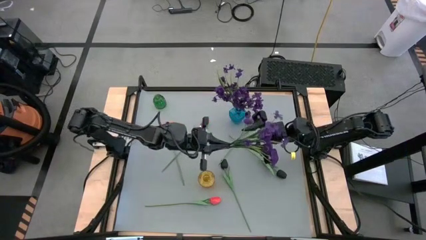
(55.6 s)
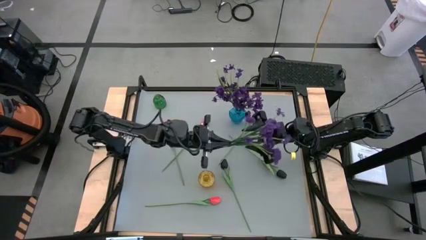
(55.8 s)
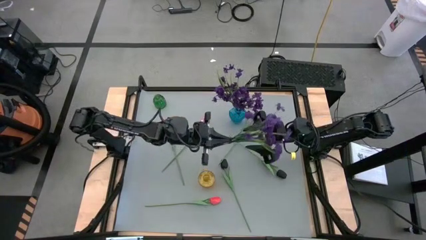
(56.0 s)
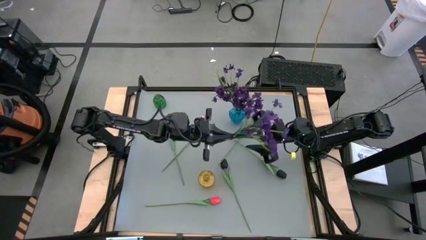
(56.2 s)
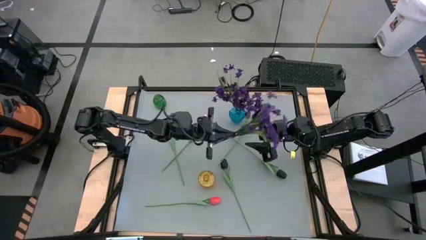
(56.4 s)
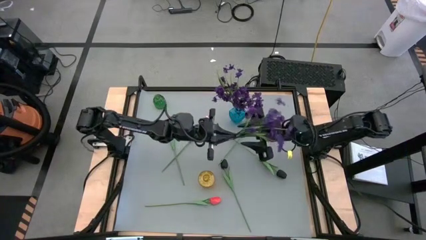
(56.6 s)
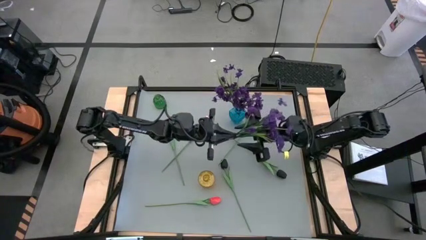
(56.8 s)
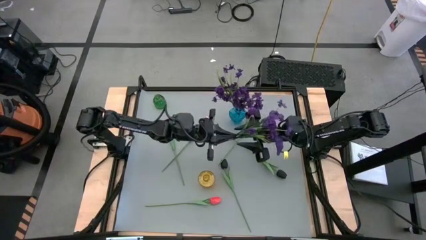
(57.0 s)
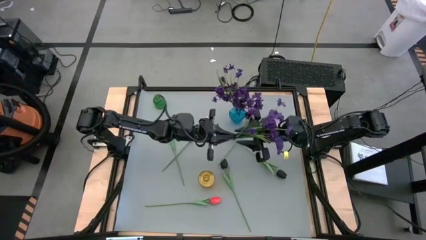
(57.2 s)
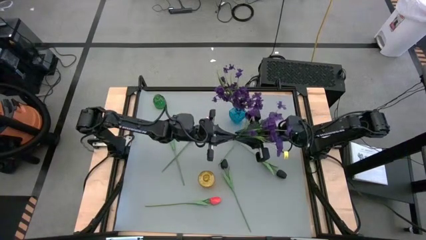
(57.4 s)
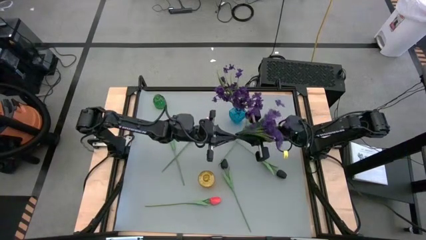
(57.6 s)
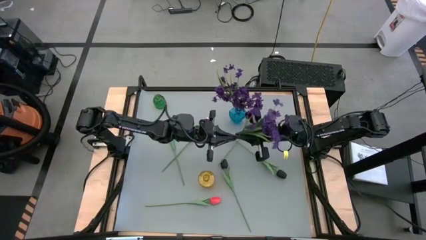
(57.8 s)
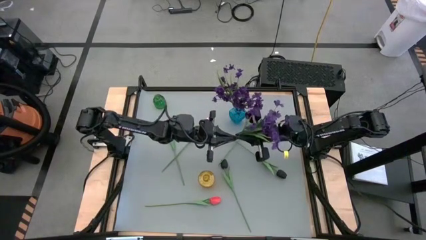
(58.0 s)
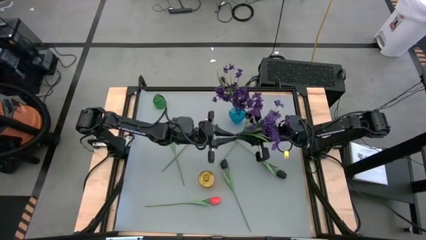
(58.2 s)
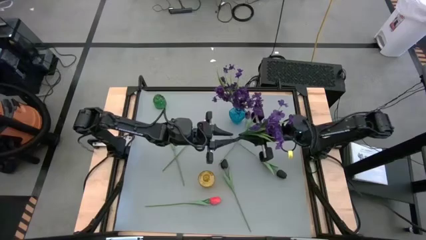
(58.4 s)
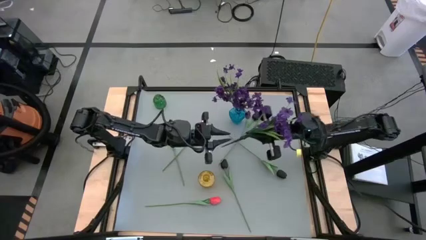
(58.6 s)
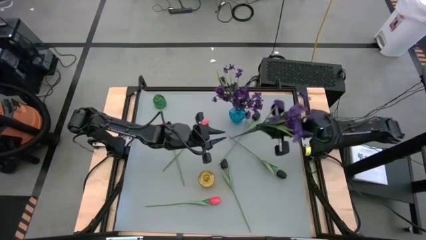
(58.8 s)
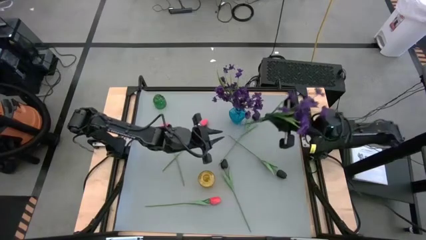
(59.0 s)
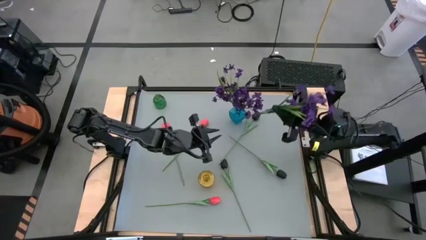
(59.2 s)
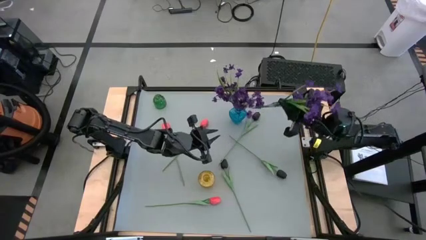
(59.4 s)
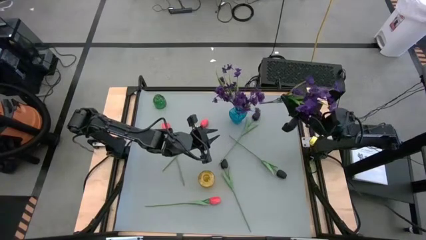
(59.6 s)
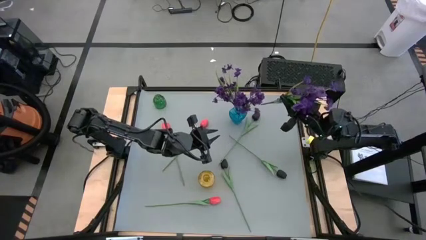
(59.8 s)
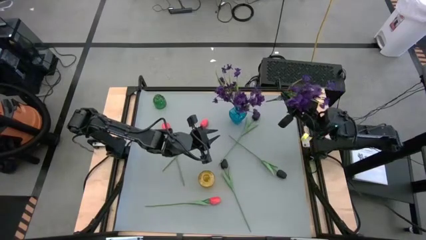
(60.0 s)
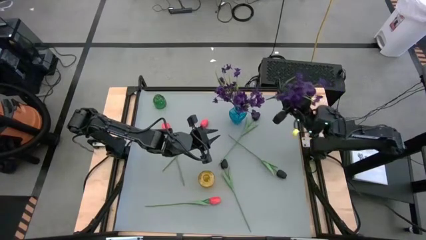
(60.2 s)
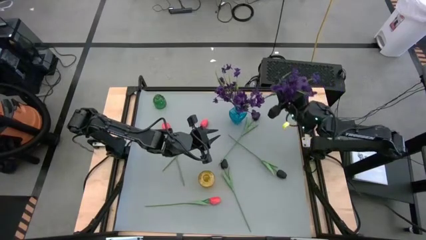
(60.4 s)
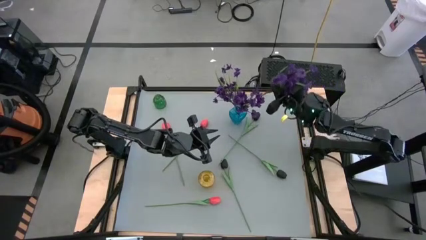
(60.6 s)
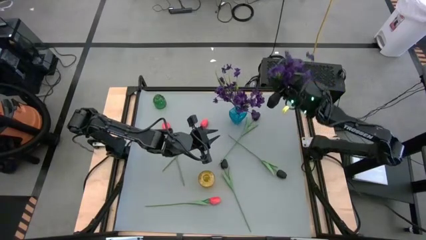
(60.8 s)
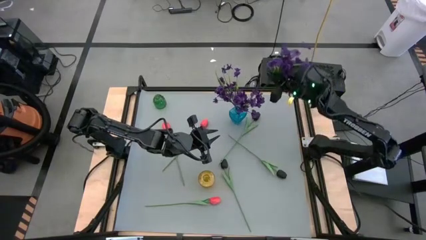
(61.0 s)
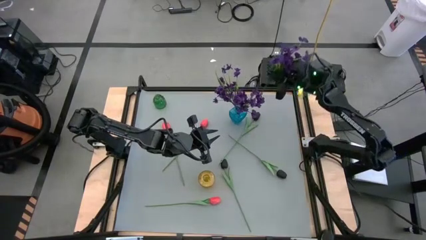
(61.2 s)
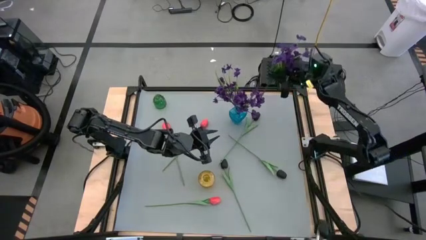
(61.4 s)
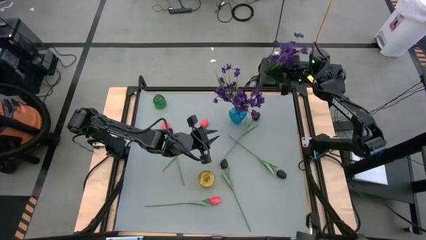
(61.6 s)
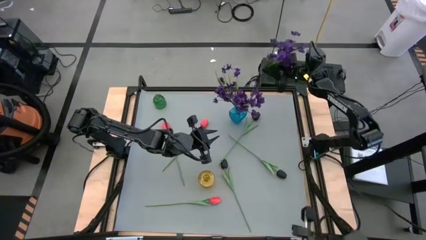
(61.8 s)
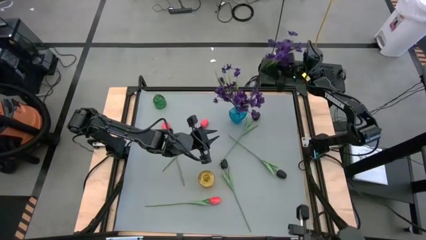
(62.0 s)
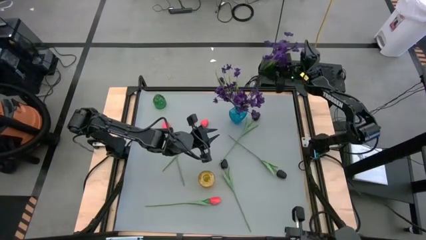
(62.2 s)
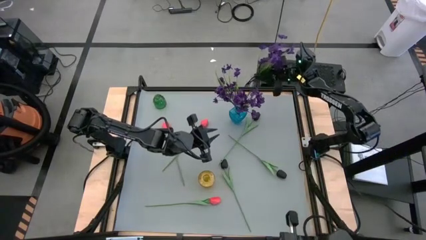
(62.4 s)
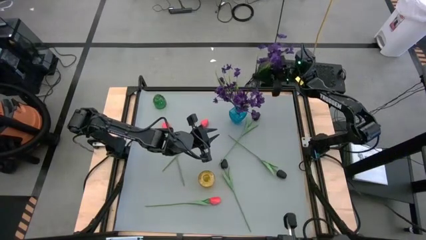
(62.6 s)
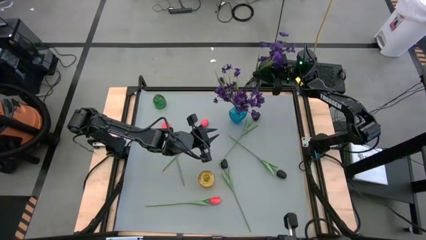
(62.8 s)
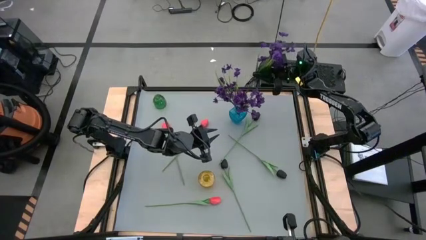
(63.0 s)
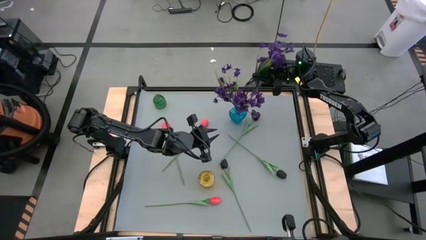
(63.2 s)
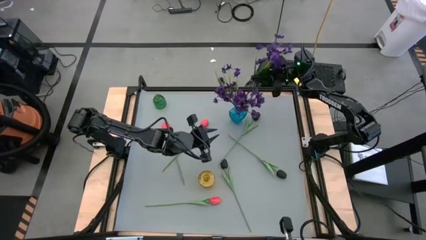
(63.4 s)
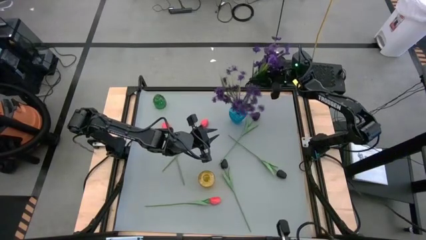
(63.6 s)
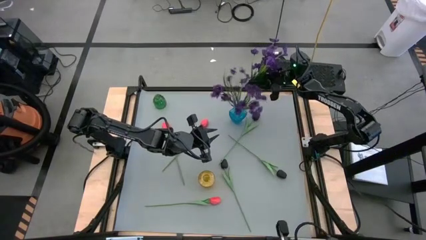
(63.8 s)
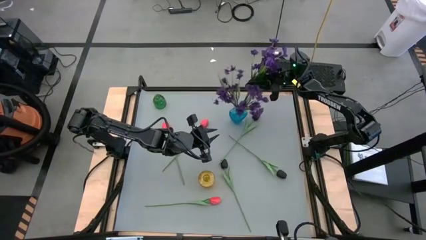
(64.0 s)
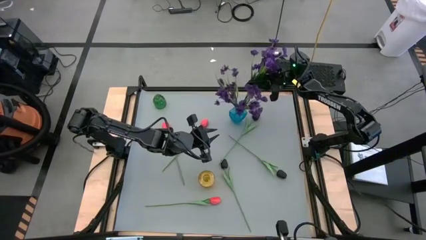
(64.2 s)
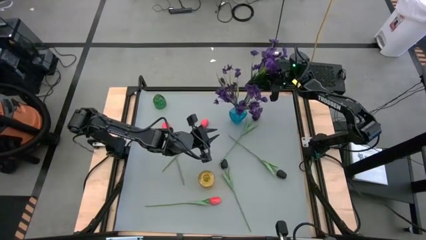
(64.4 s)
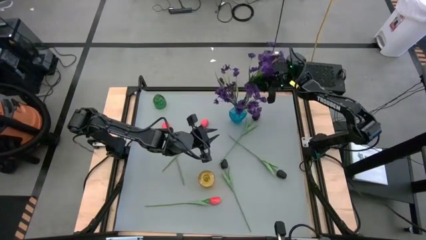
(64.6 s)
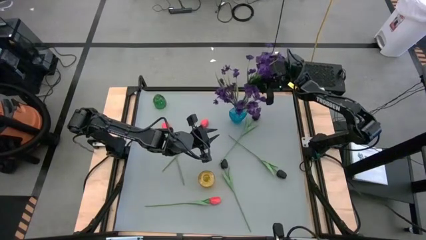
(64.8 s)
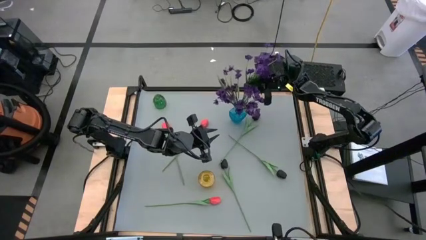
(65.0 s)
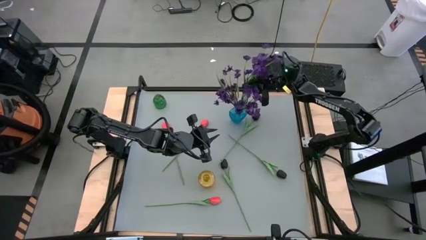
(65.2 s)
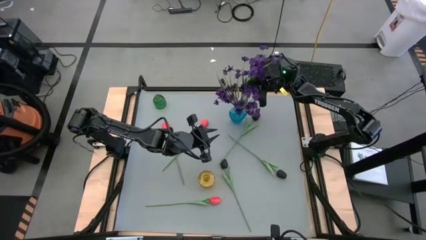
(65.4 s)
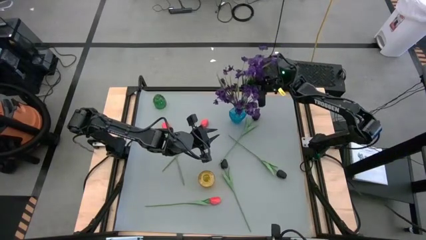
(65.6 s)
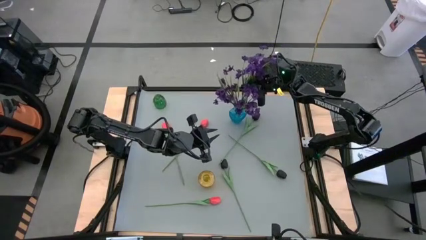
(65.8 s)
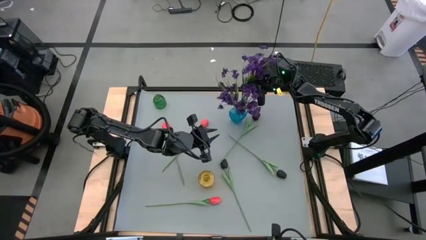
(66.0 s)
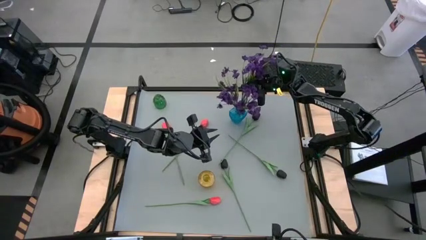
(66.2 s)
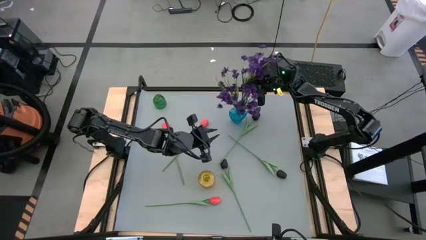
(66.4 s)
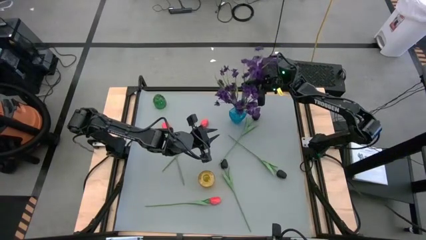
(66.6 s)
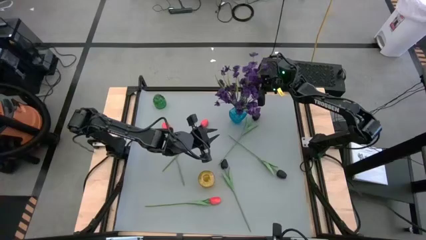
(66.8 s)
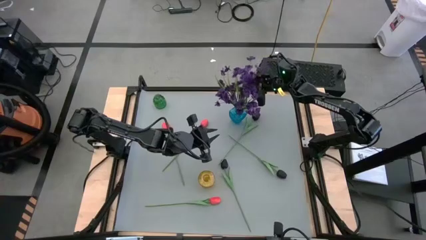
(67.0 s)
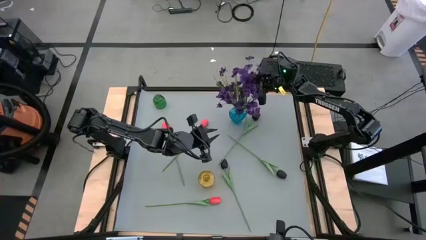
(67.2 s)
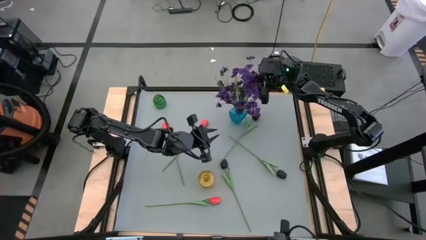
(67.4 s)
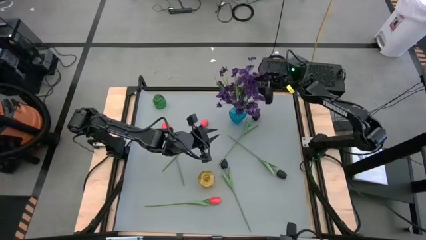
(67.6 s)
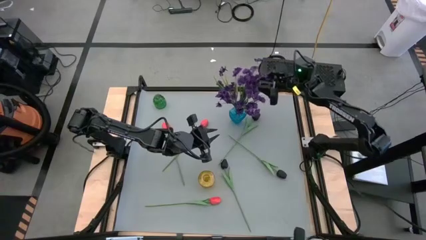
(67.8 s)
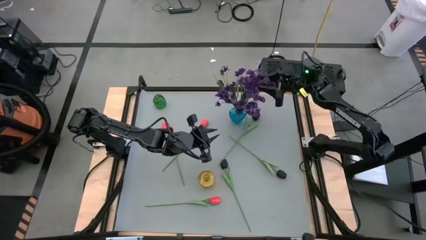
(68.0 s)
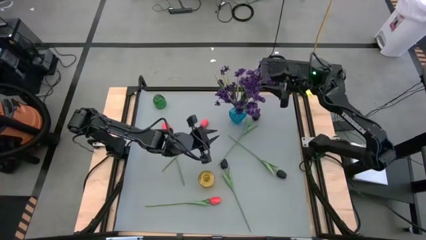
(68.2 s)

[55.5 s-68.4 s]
Task: Sort flowers into vase by color
Put the purple flowers into the blue vase

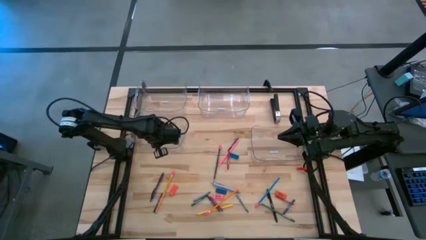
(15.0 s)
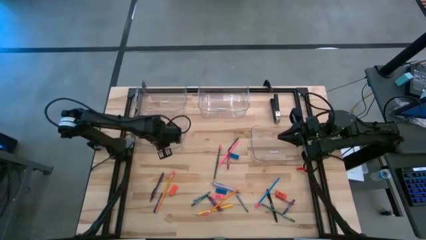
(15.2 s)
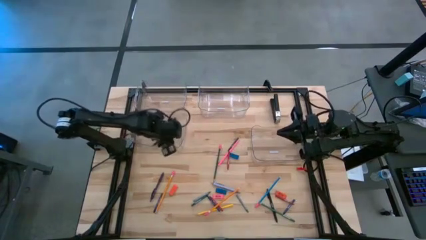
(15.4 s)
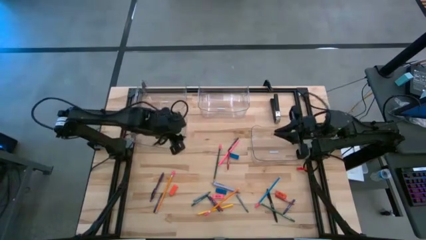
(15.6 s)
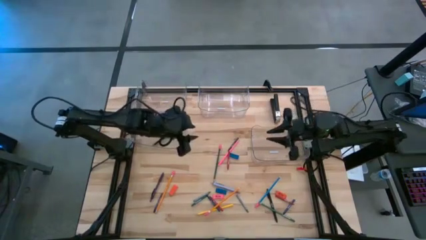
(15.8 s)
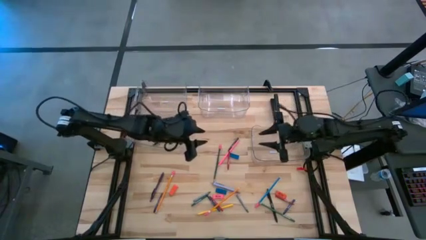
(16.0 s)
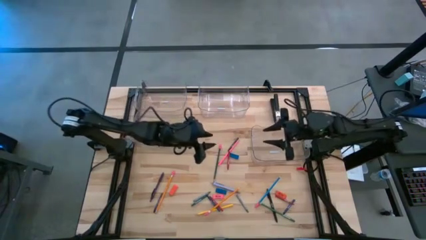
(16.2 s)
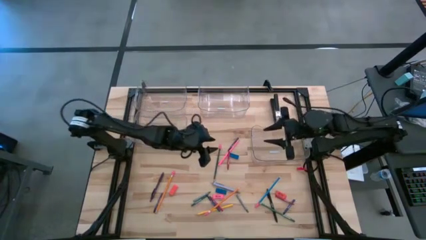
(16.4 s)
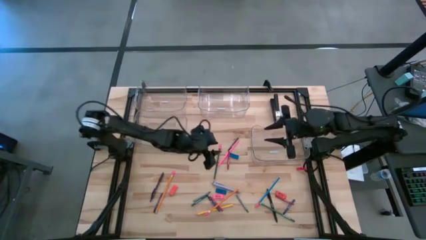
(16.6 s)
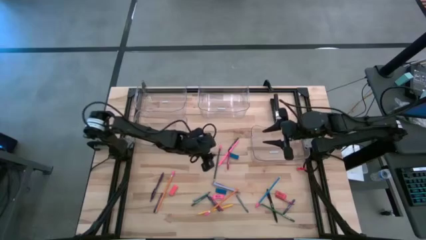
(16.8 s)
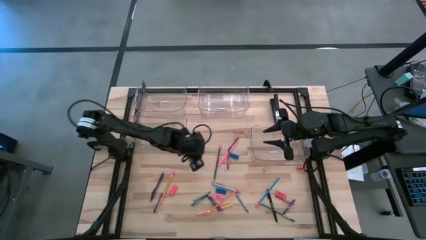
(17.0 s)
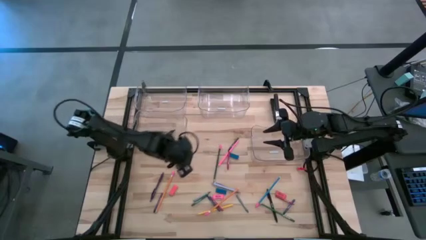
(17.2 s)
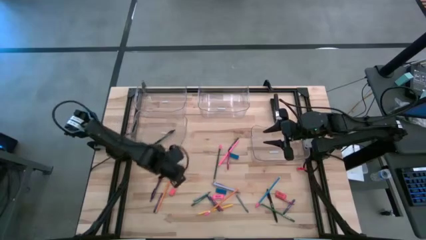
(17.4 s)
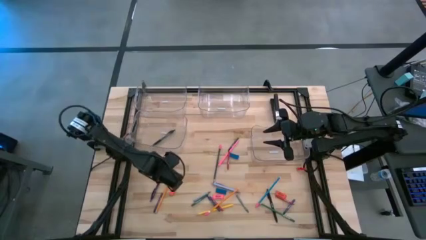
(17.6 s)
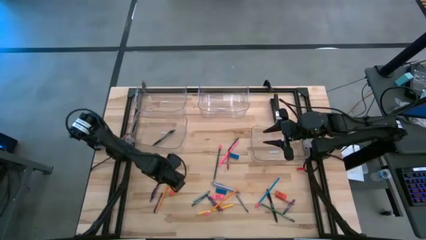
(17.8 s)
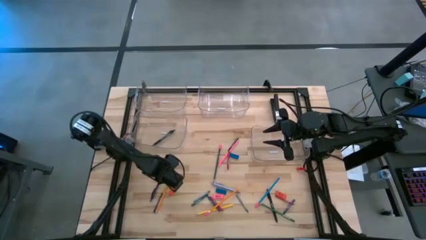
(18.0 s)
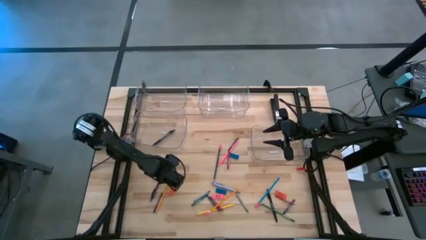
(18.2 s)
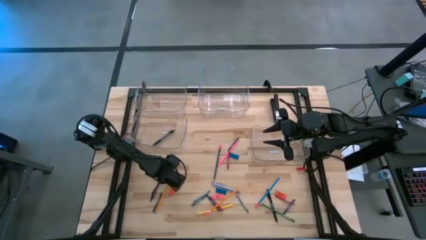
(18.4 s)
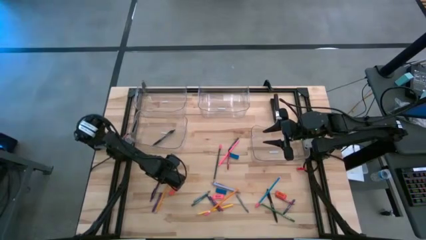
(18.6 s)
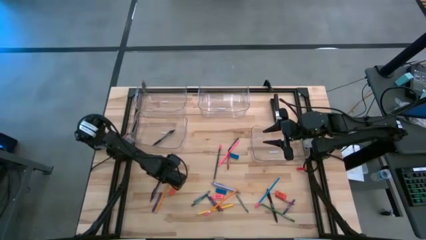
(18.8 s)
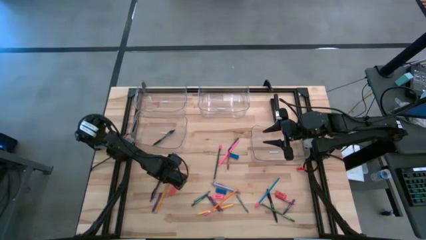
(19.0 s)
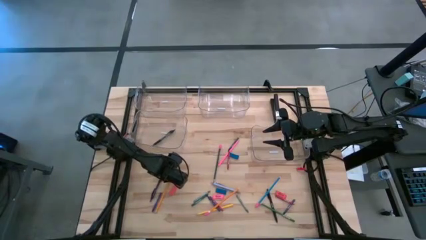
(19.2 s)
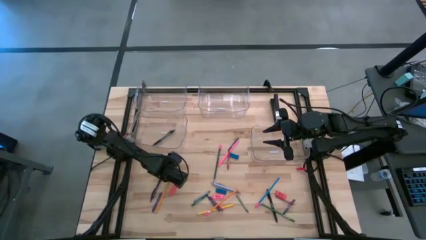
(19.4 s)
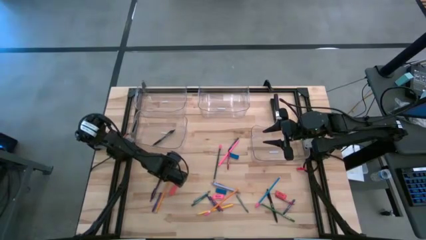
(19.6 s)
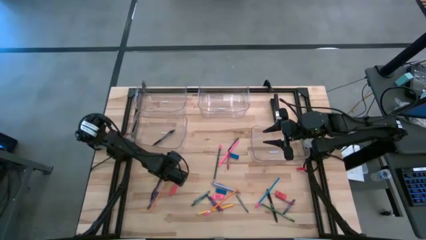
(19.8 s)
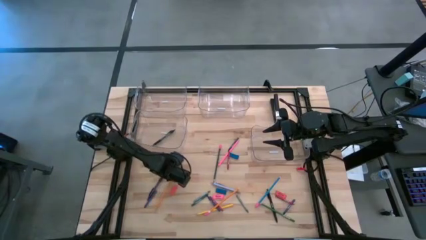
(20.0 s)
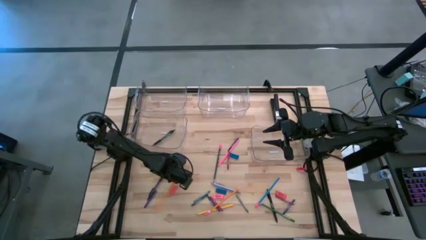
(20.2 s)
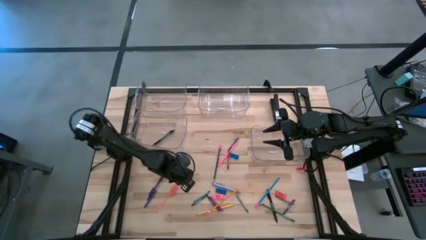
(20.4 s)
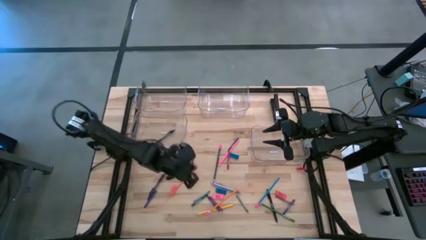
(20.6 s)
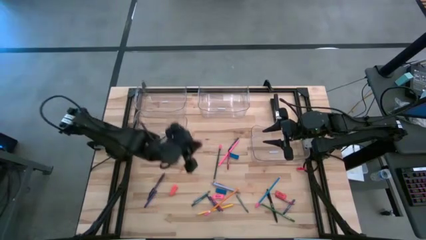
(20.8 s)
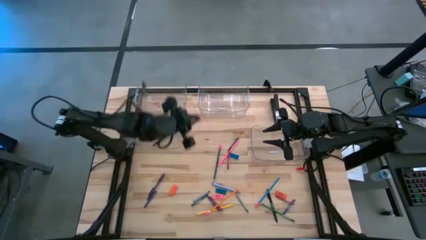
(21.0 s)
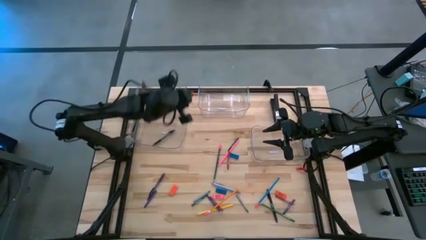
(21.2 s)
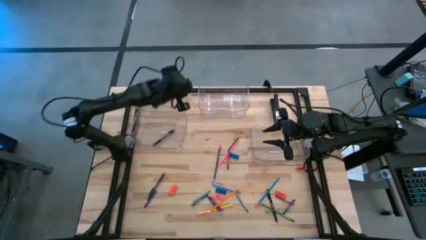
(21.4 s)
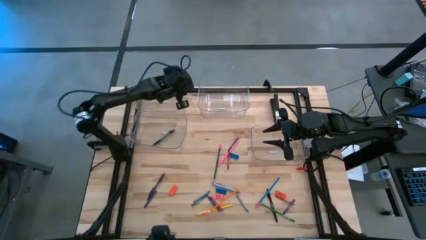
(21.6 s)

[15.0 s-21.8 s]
Task: Sort crayons/erasers/pens/pencils in bins
Put the orange pencil into the top left transparent bin
